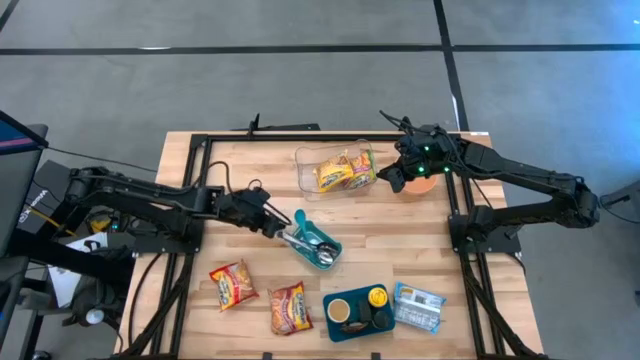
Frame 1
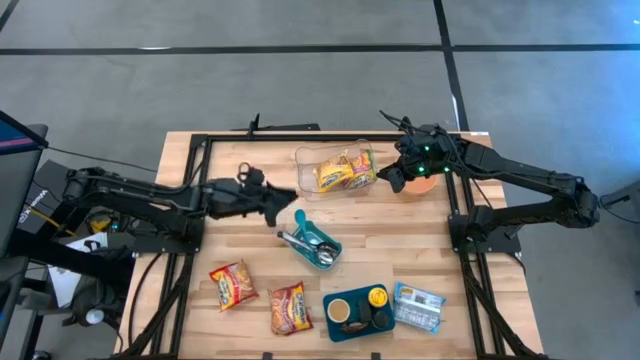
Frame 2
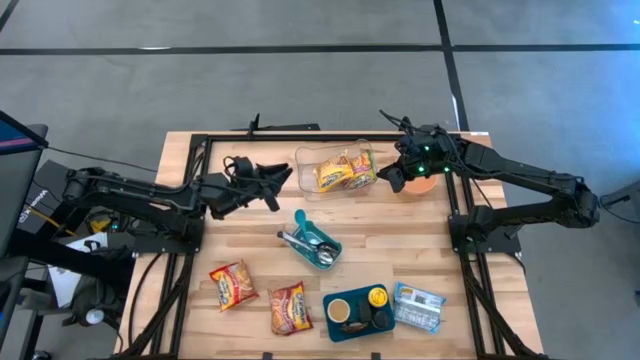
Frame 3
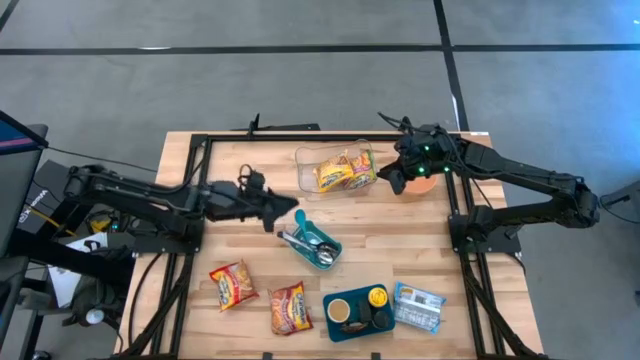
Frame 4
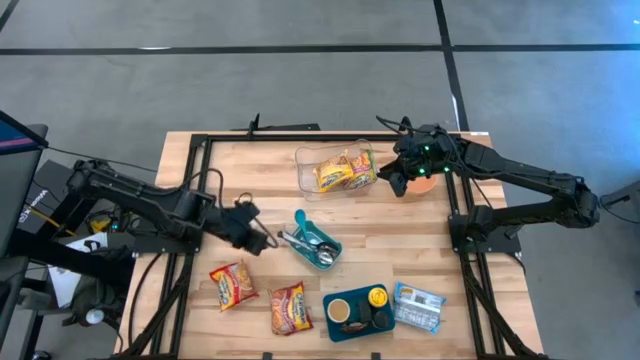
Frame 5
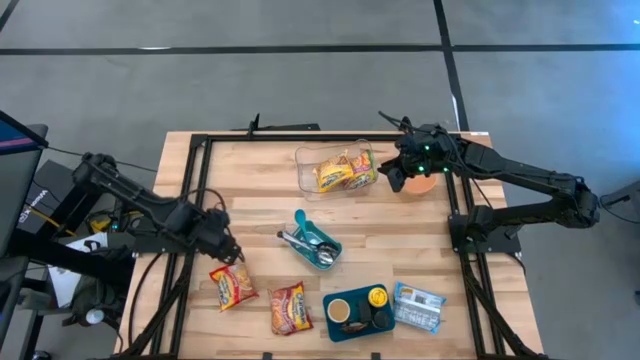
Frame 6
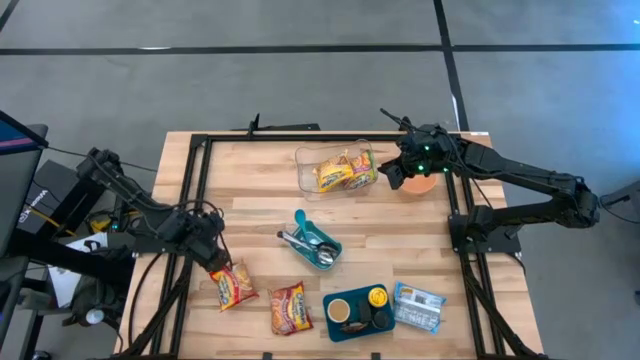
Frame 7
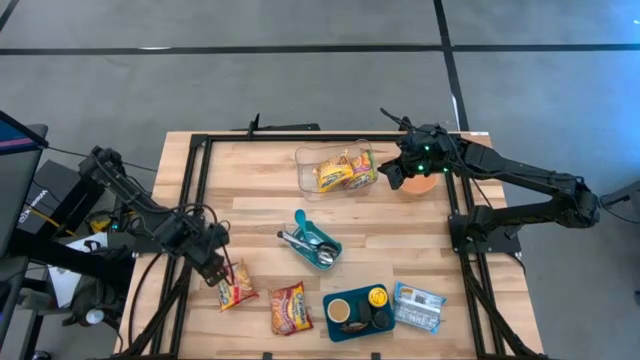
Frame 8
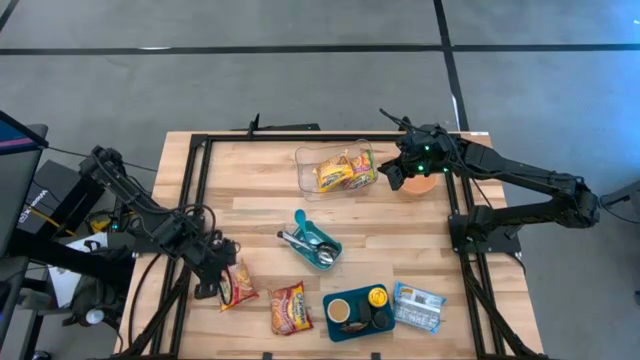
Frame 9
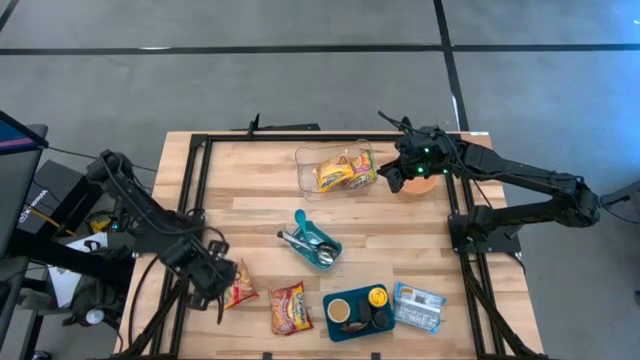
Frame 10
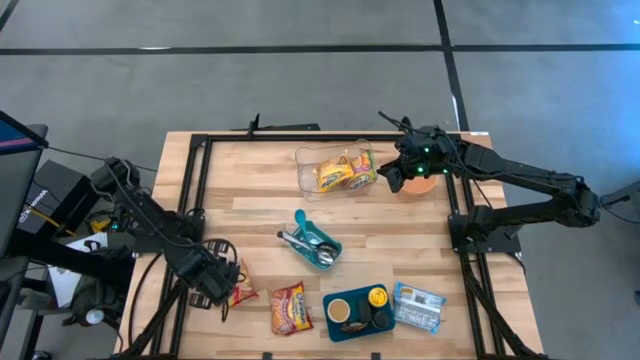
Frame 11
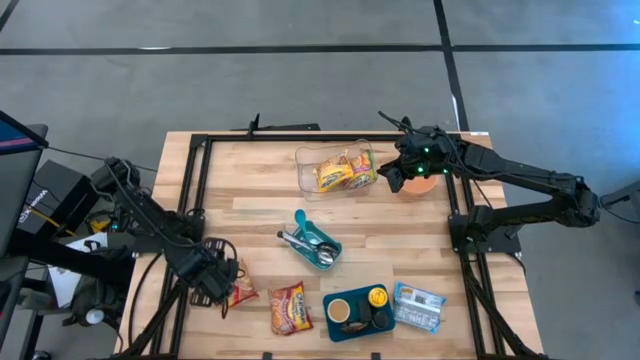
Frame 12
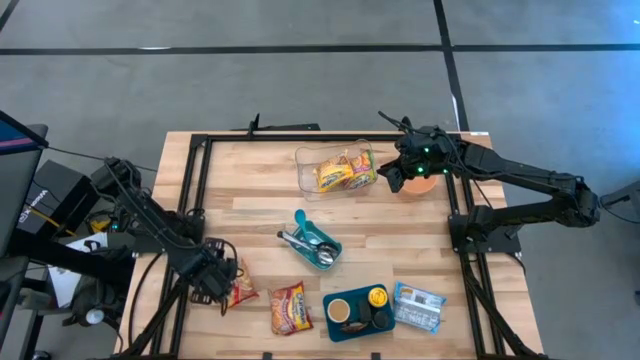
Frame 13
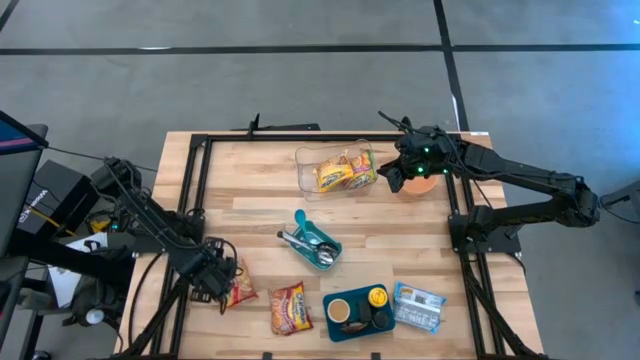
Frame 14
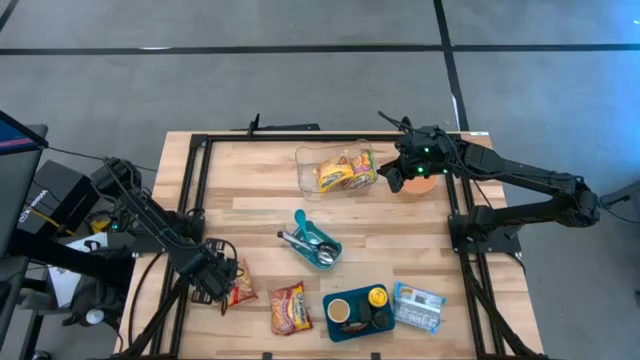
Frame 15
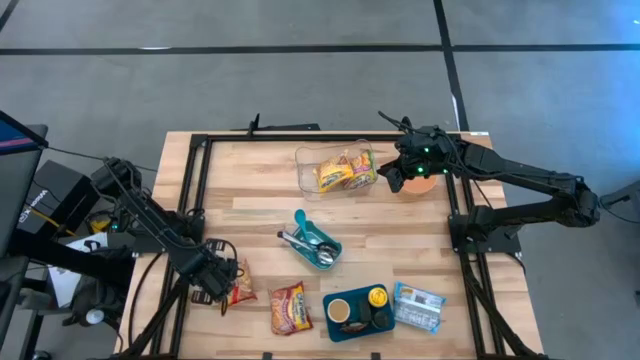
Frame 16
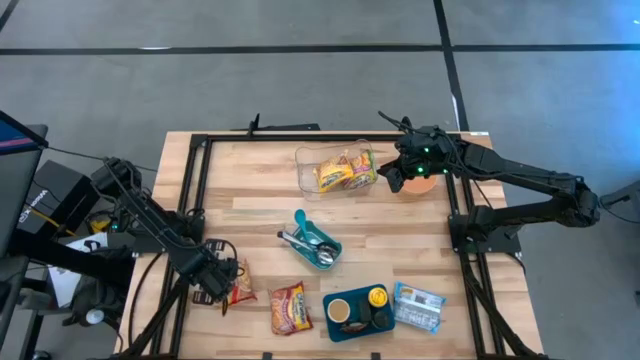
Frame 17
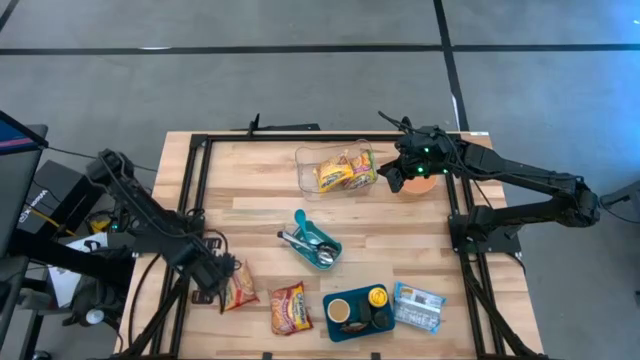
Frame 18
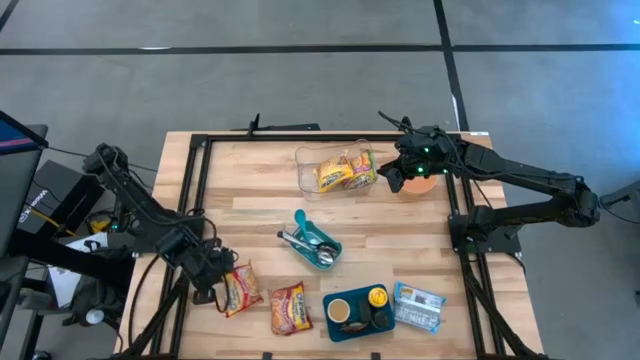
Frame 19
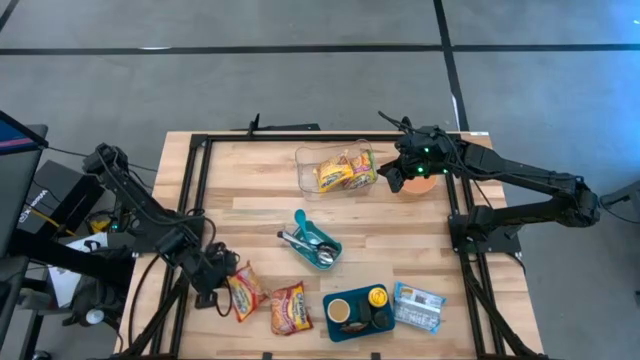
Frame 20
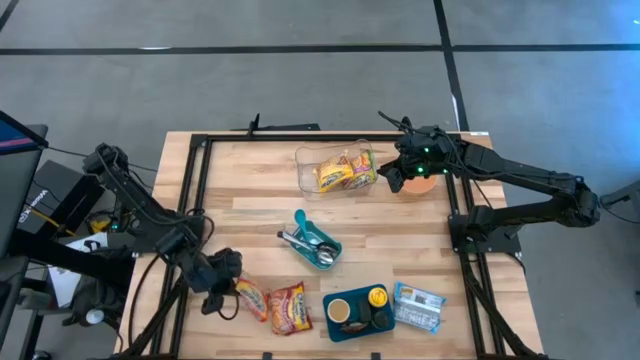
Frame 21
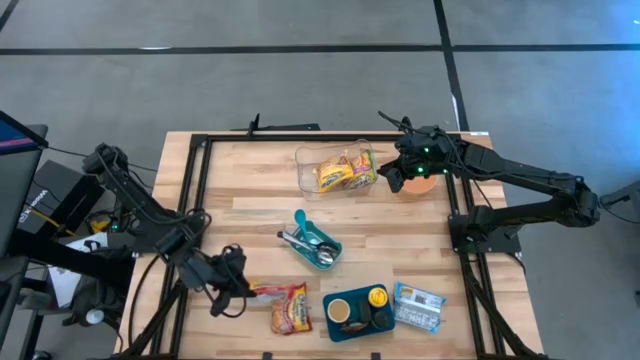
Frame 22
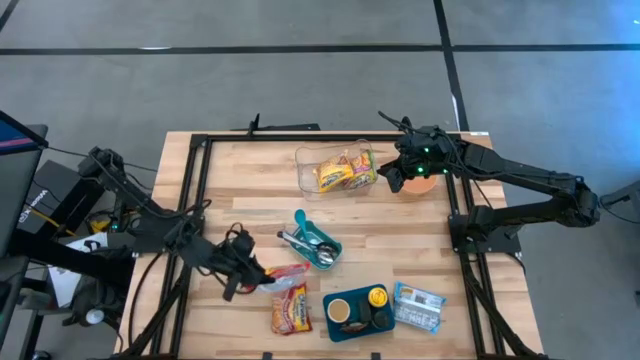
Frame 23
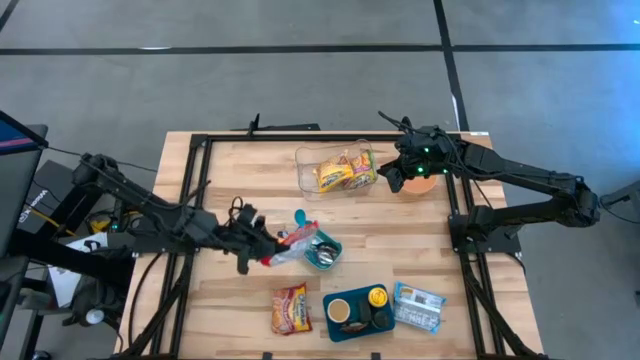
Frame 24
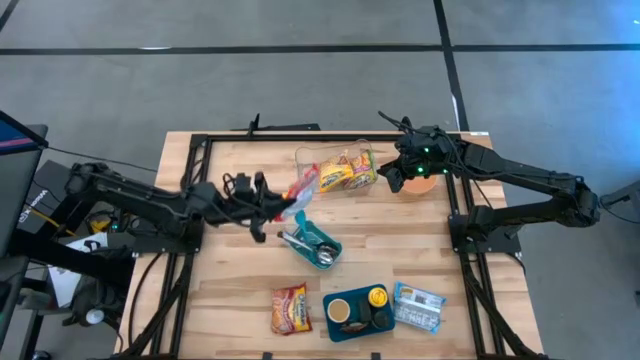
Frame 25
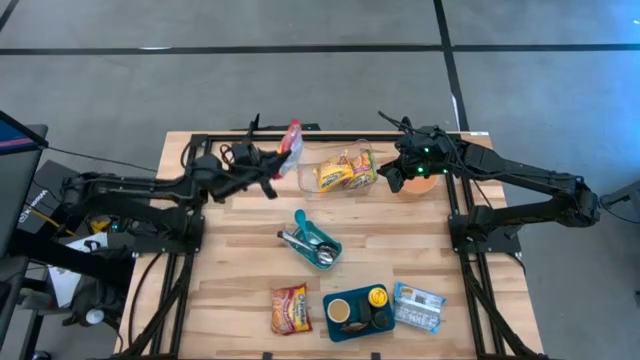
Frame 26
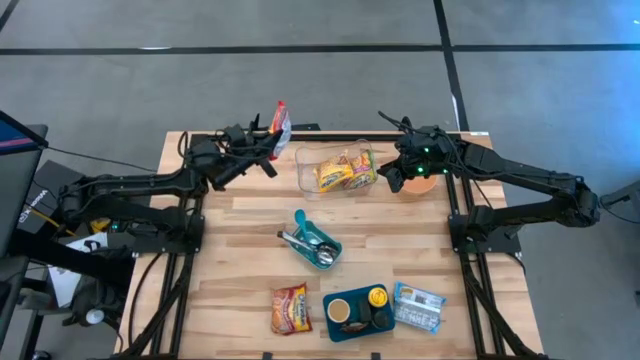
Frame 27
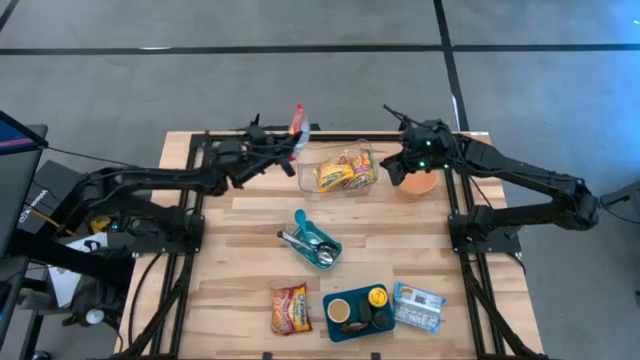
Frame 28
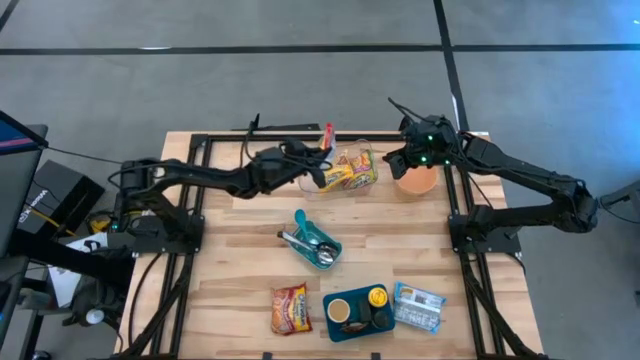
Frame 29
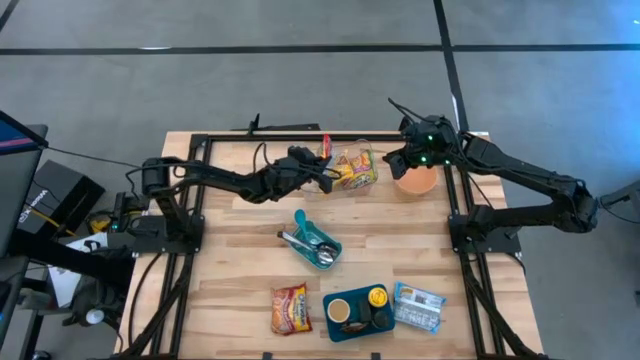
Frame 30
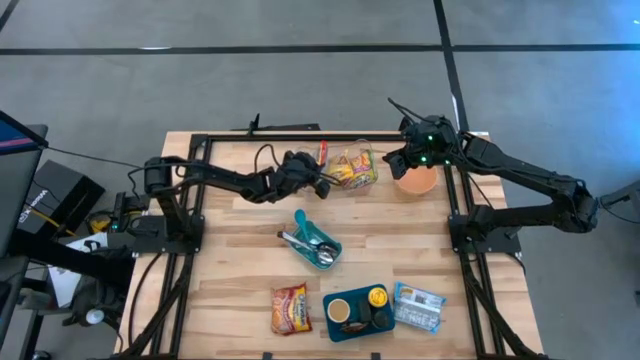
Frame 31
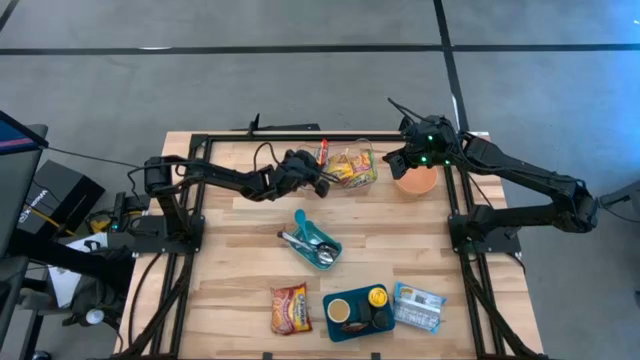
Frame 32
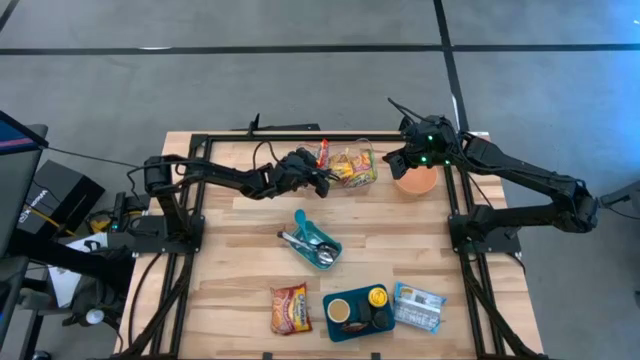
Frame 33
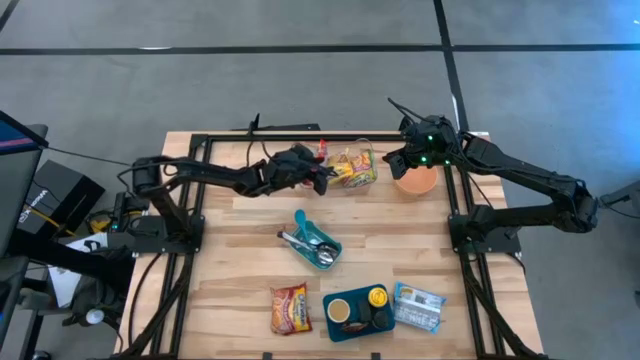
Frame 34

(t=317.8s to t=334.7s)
Task: Pick & Place Food Item
Put the orange noodle pack into the transparent bin

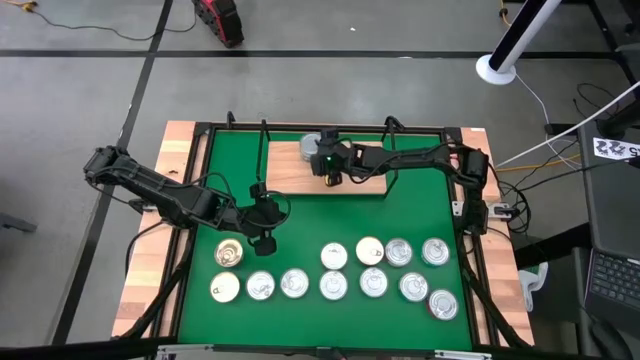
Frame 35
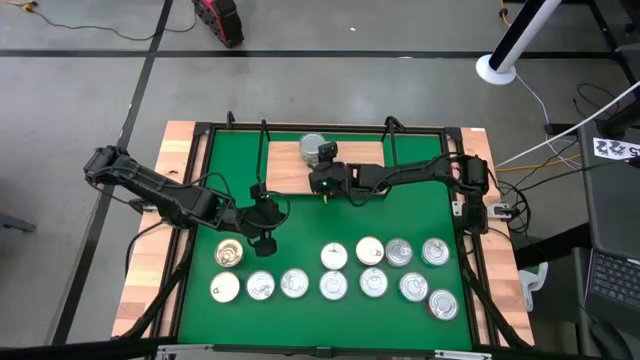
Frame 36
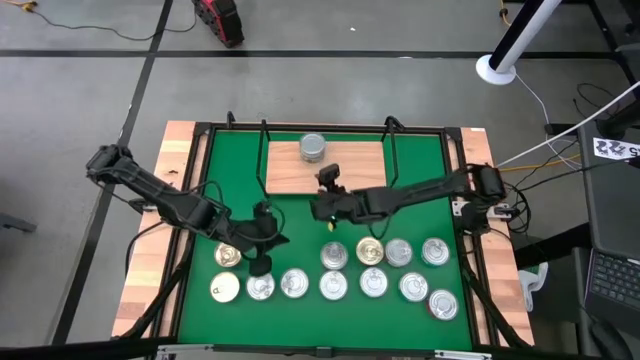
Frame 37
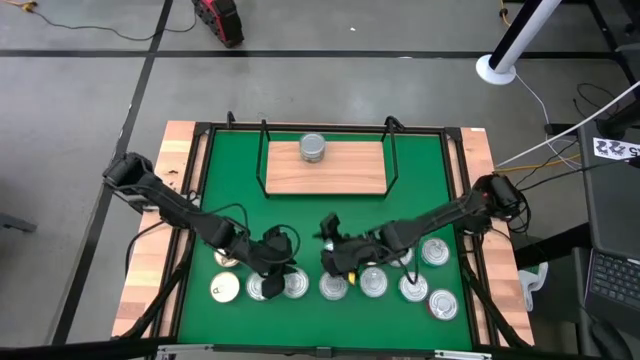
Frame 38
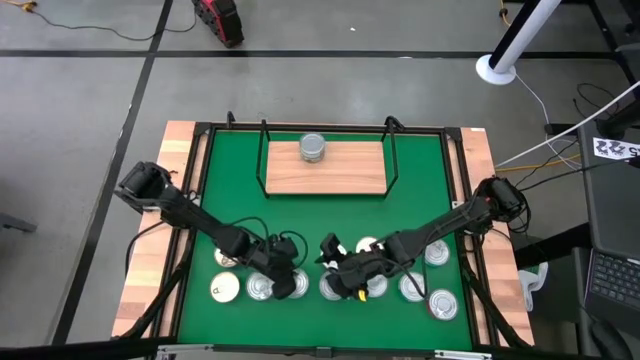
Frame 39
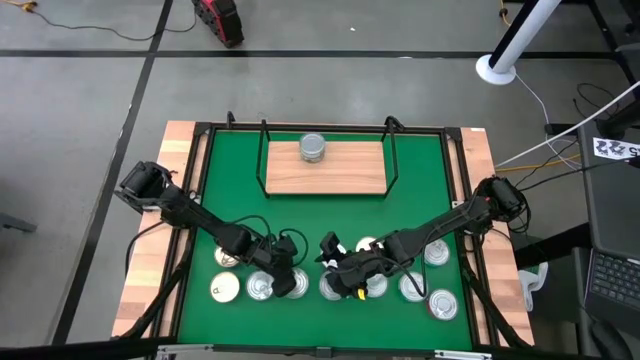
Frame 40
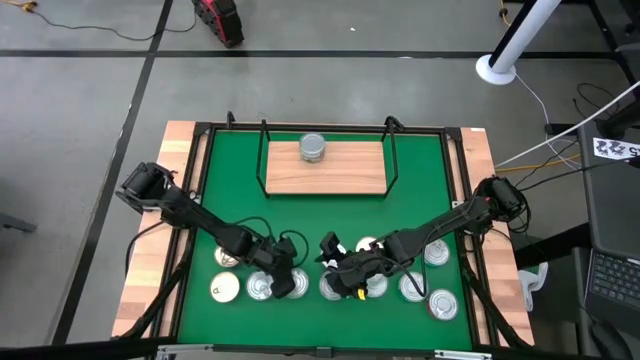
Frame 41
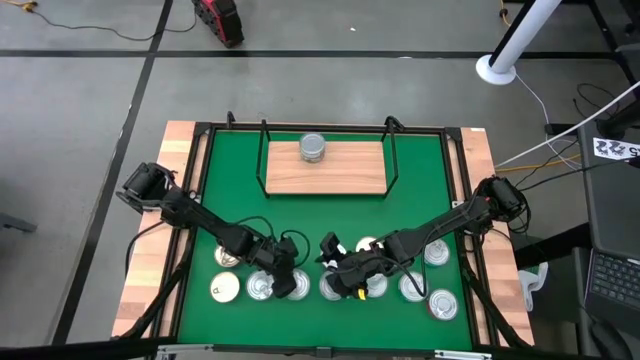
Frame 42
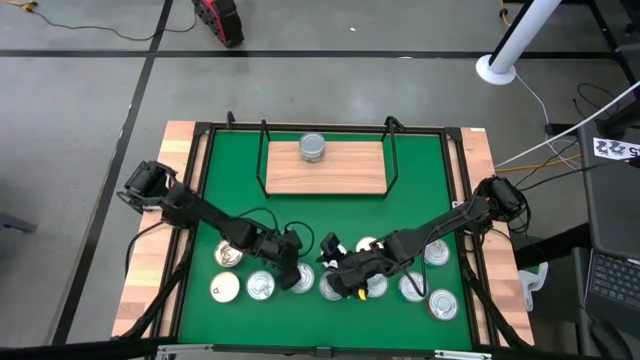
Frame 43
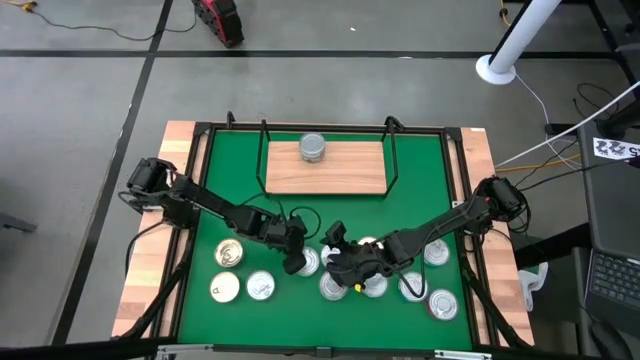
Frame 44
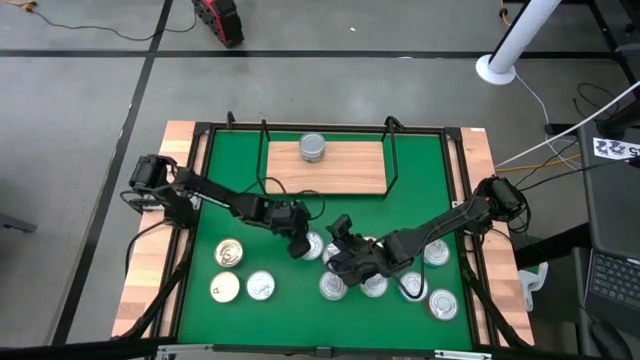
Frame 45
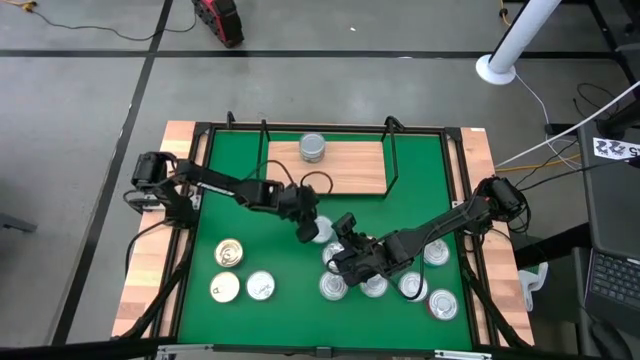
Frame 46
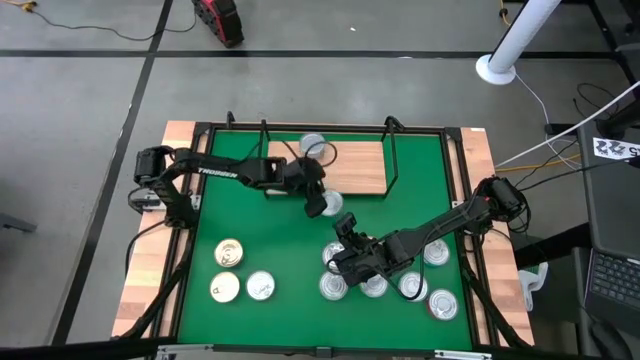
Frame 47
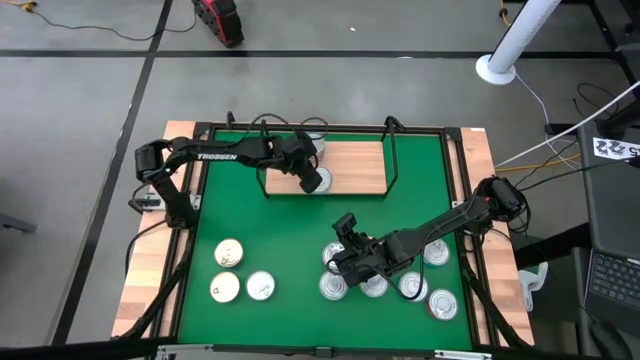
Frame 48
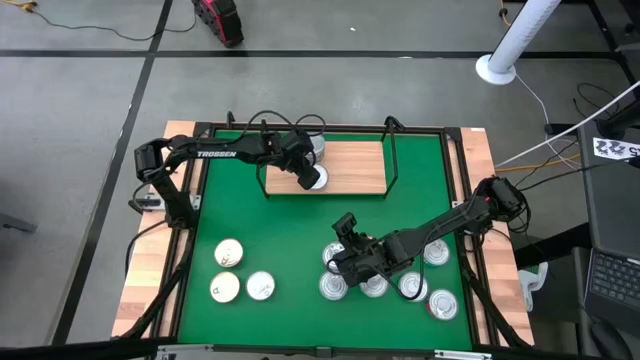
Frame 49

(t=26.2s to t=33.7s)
Task: Stack canned seafood by type on shelf
Put the yellow blue tuna can on the shelf
